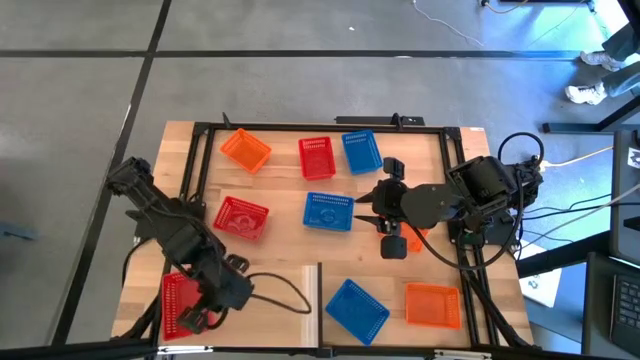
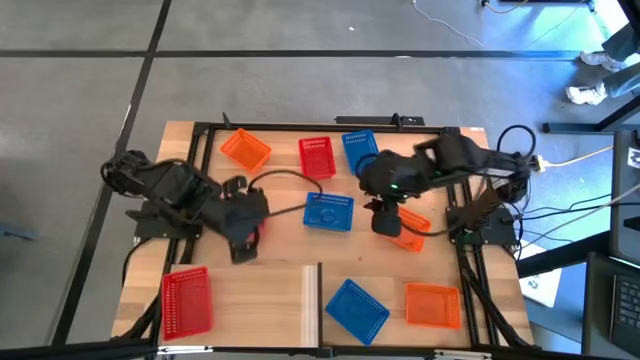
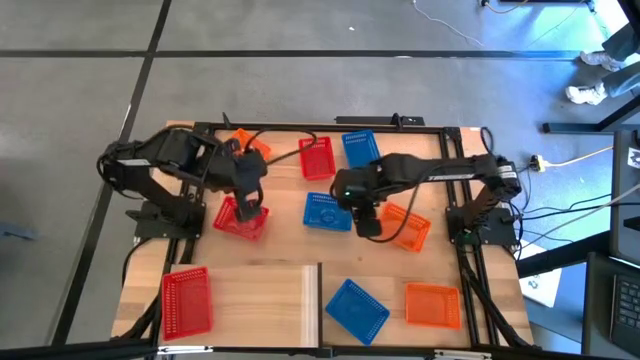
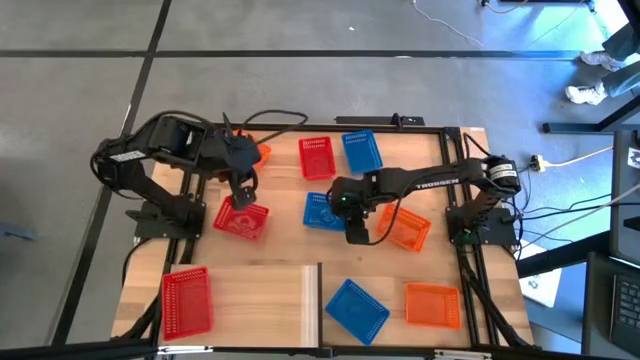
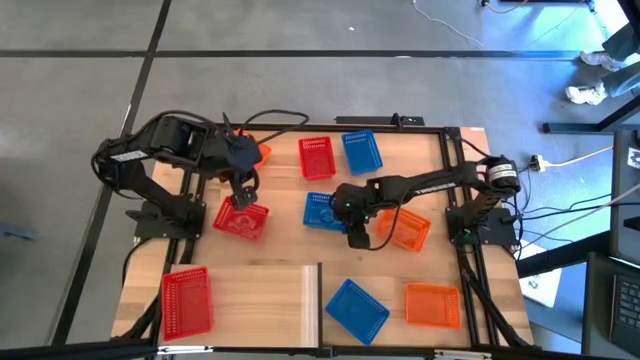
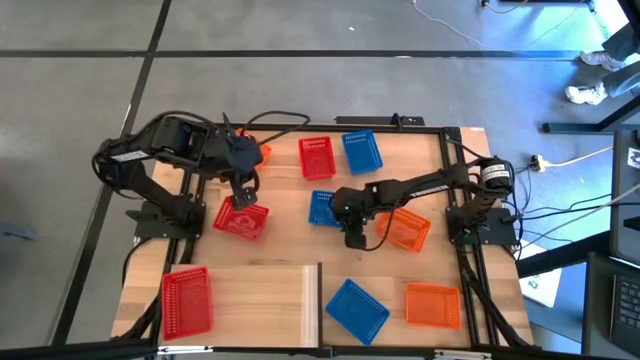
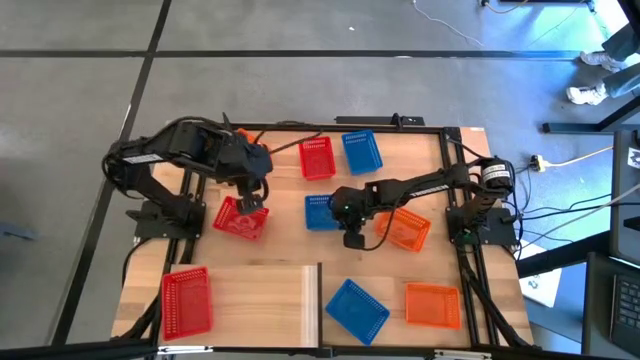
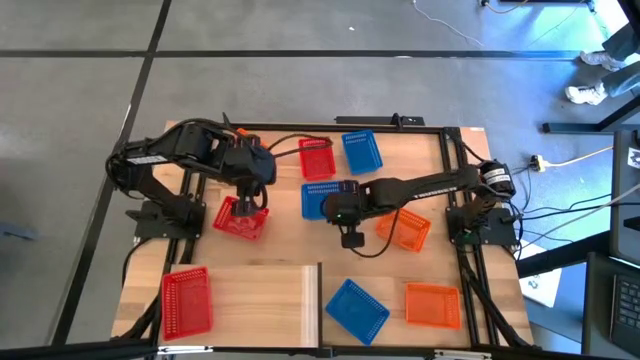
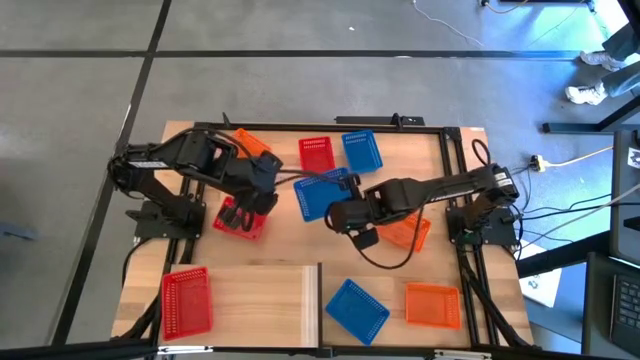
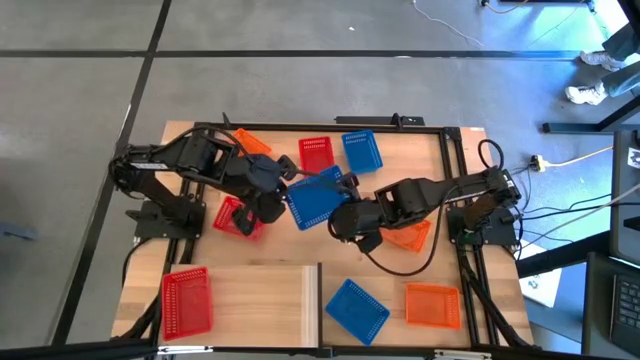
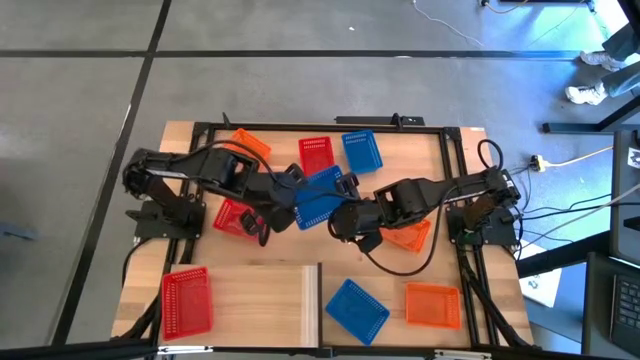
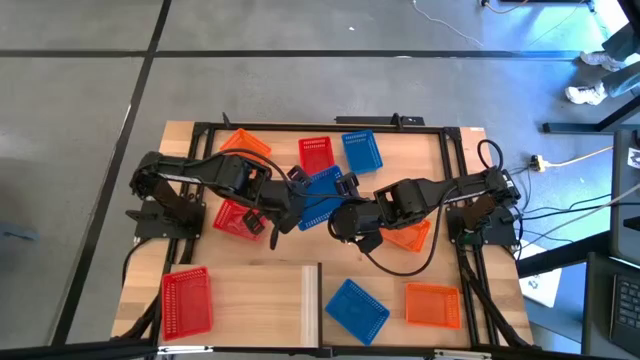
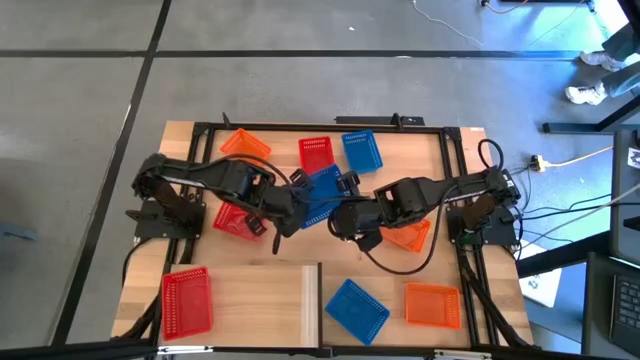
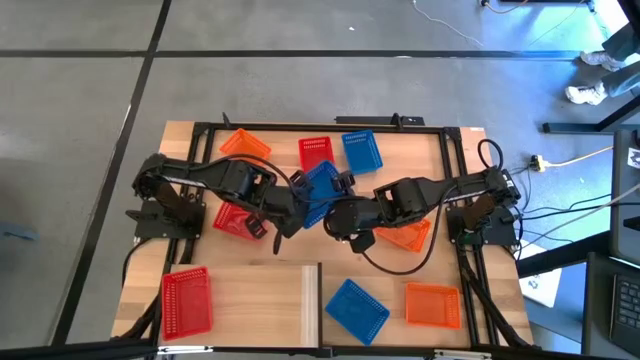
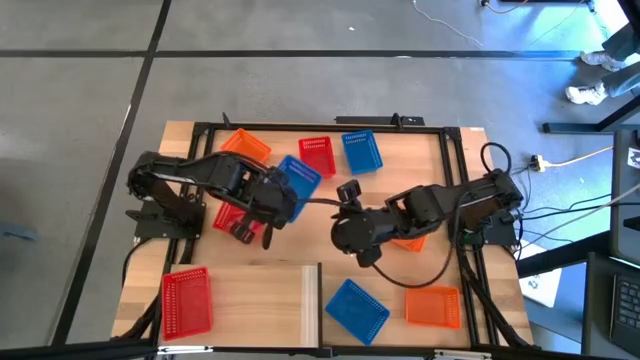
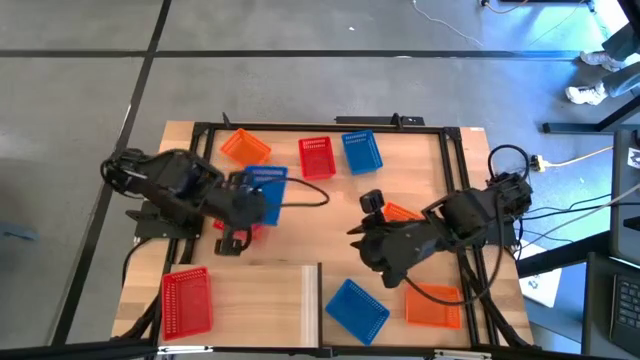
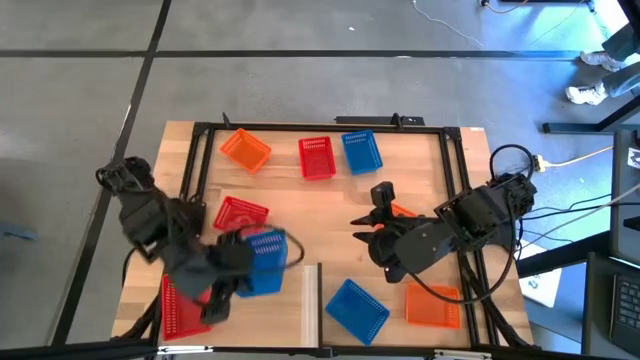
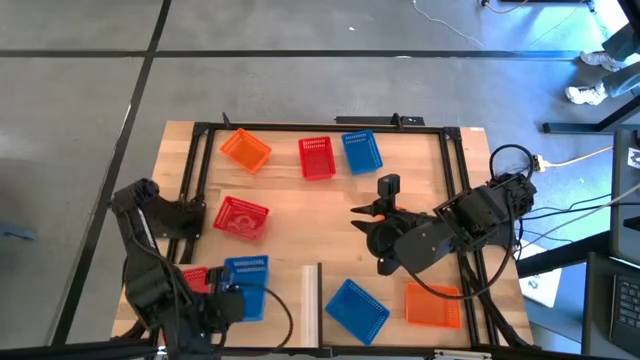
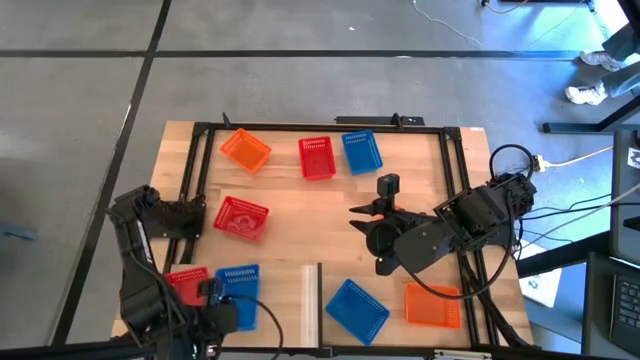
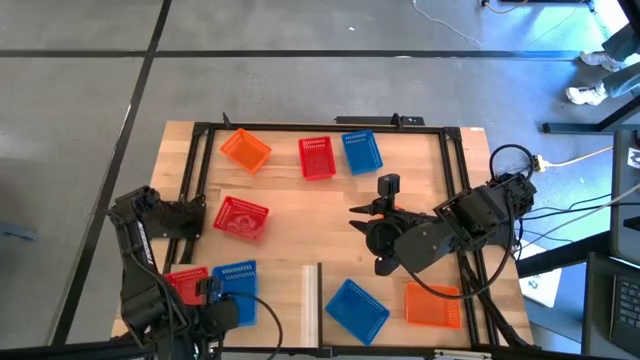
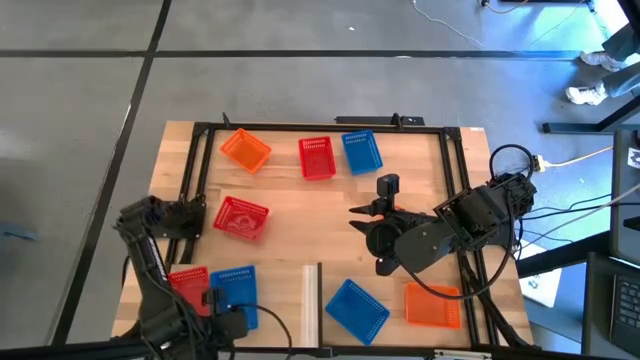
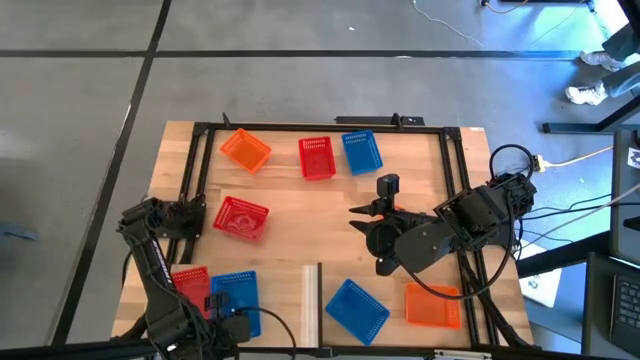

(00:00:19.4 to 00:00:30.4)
Task: Stack baskets on shelf by color
Put the middle blue bin on the shelf

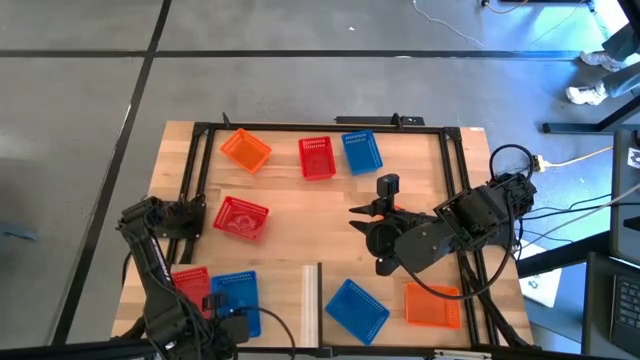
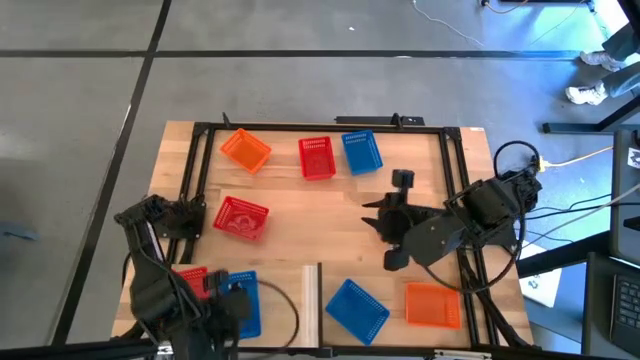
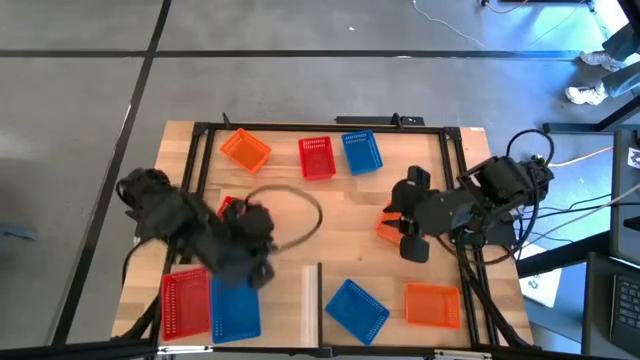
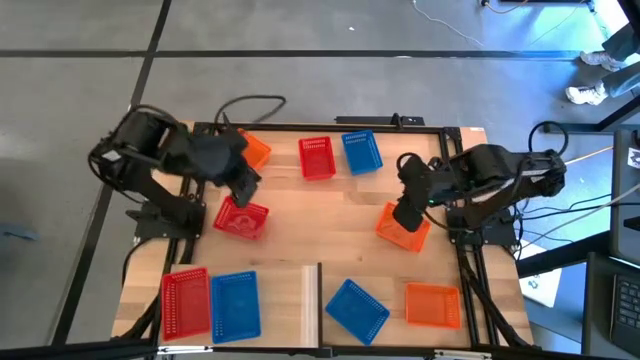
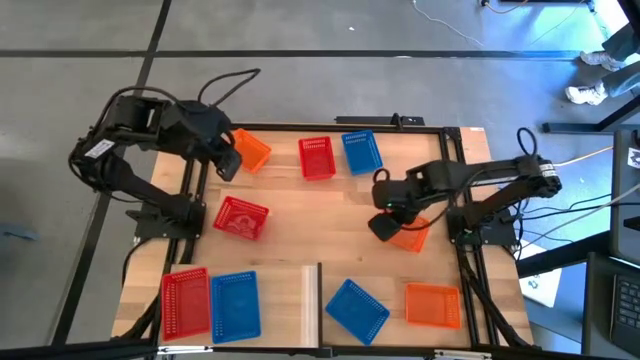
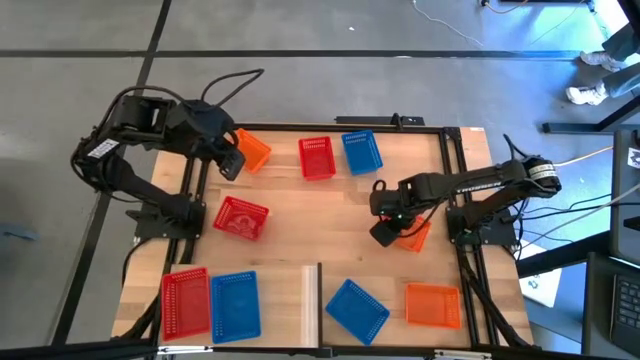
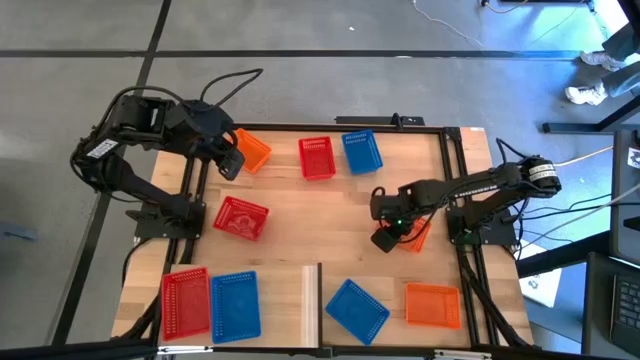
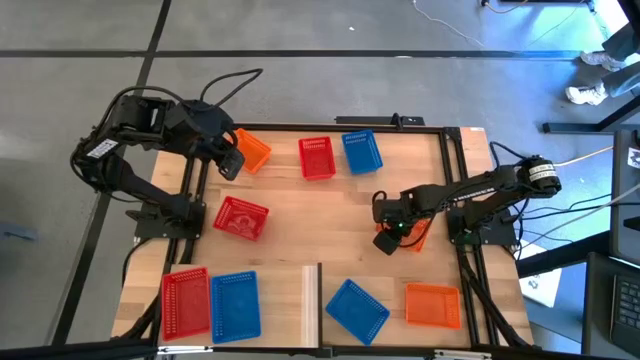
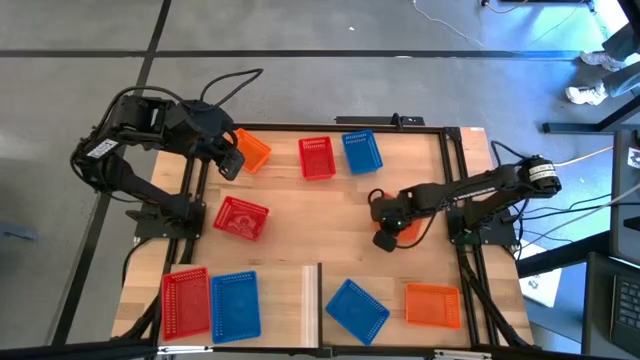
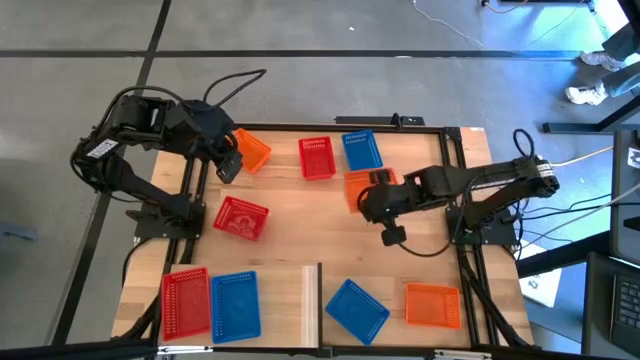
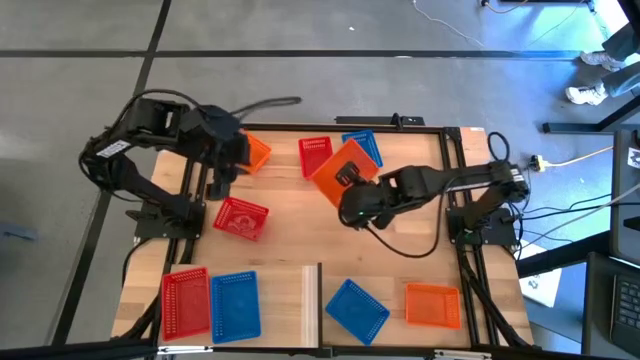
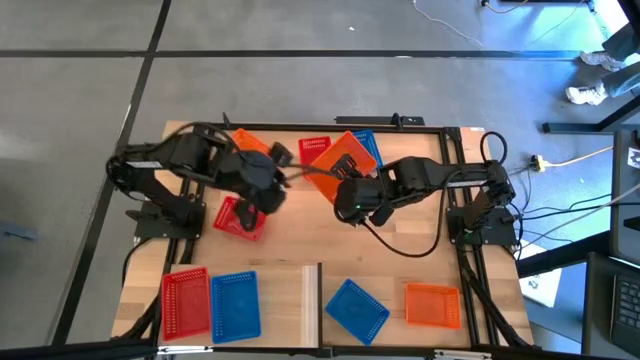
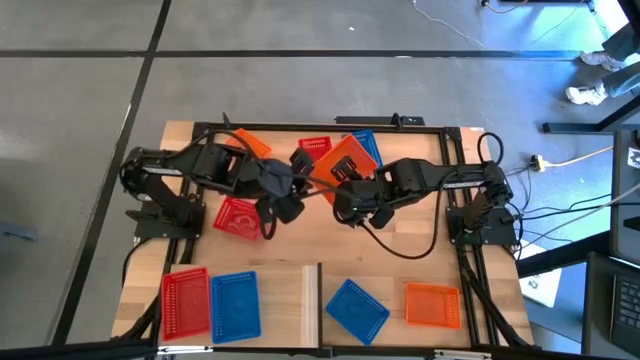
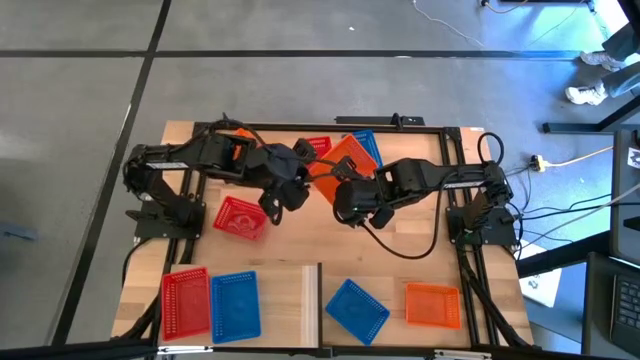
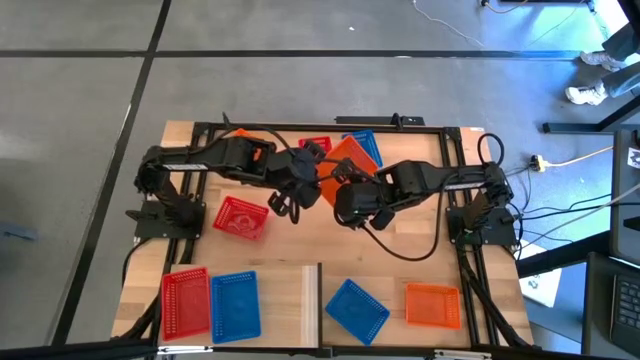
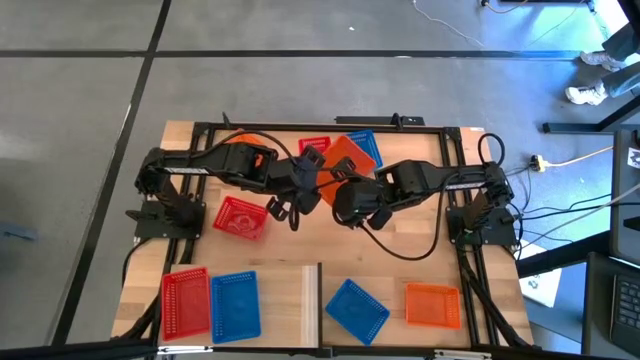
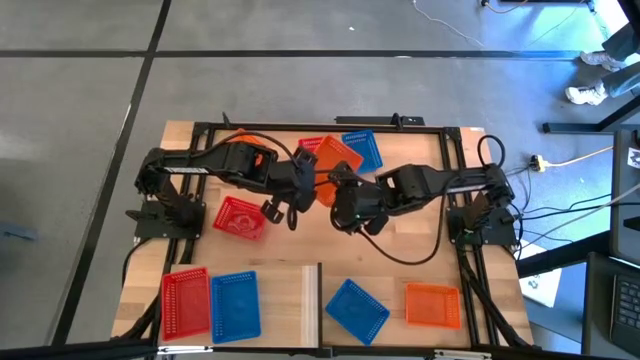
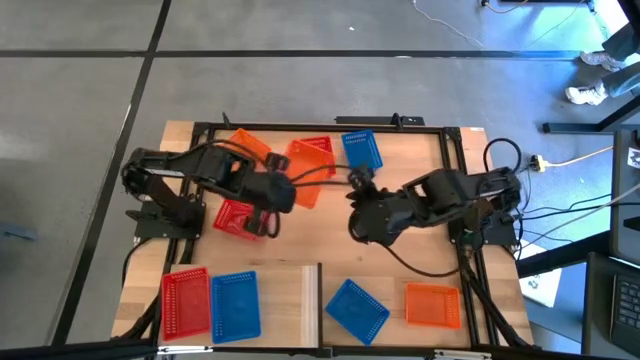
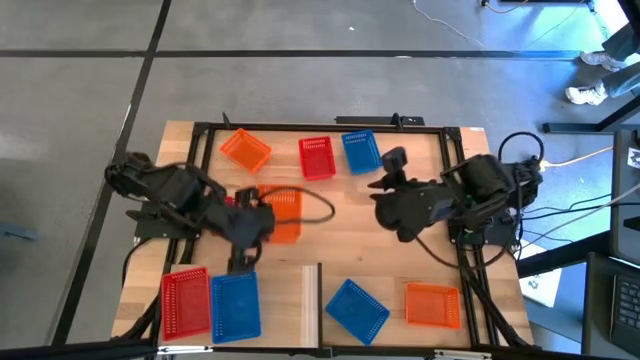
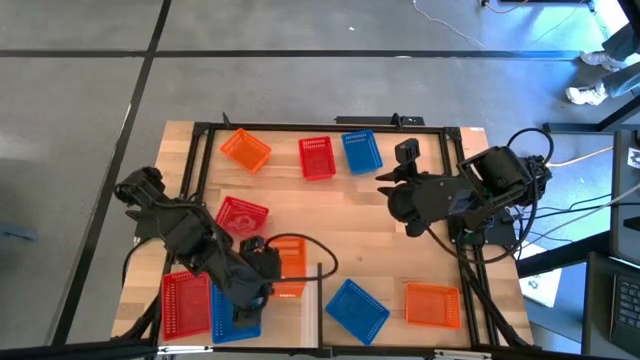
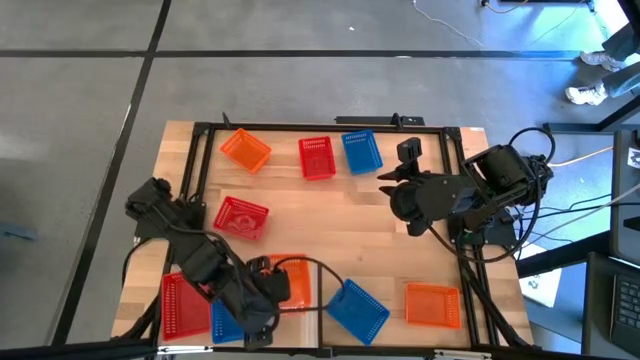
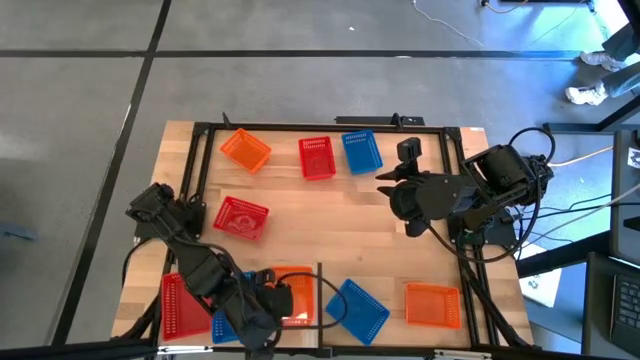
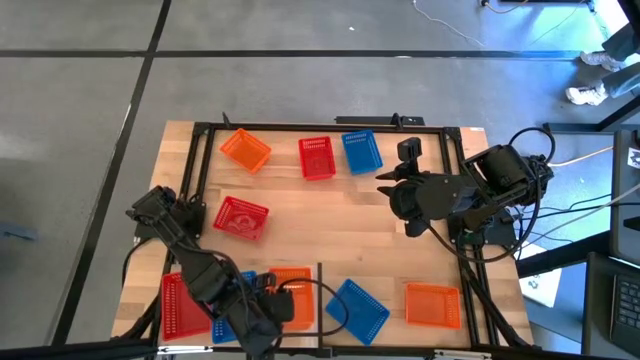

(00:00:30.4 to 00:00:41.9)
Put the middle orange bin on the shelf
